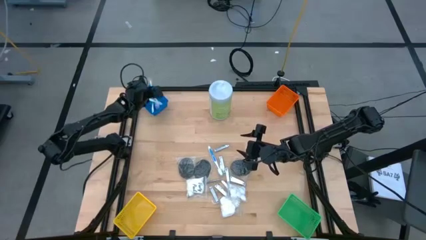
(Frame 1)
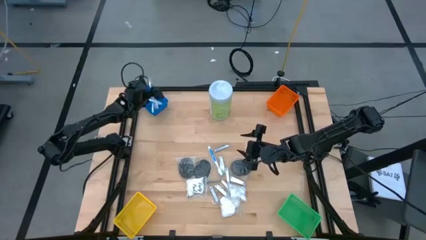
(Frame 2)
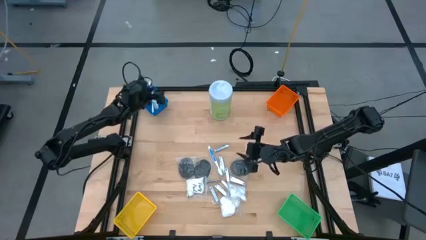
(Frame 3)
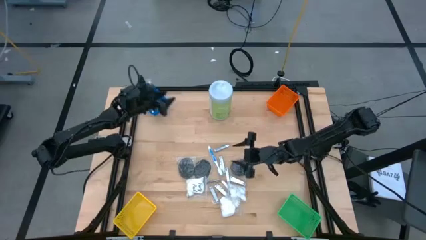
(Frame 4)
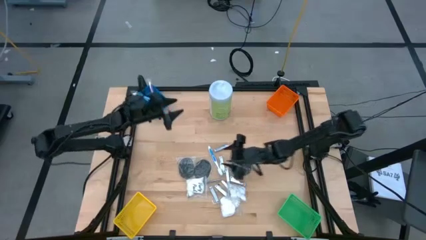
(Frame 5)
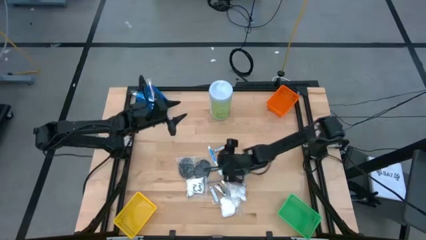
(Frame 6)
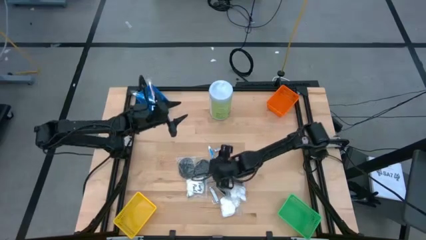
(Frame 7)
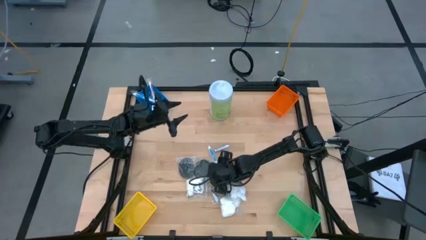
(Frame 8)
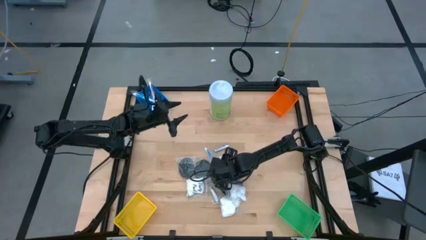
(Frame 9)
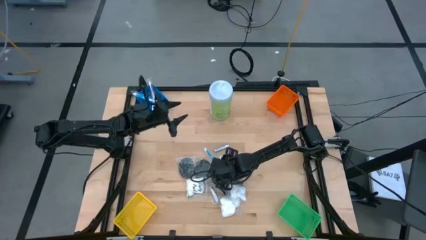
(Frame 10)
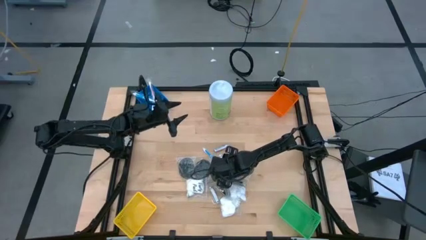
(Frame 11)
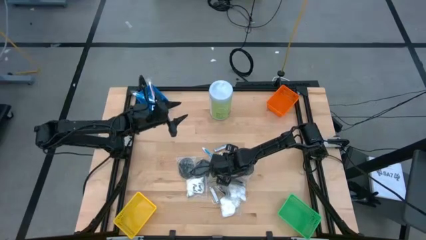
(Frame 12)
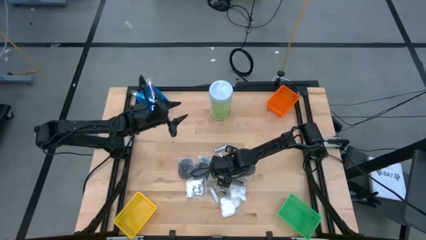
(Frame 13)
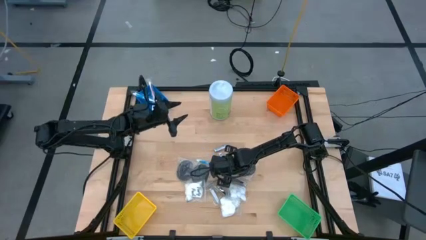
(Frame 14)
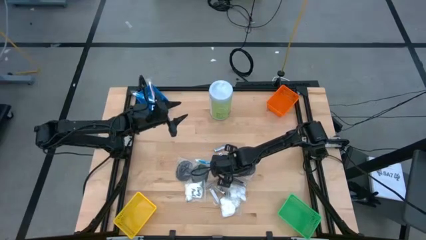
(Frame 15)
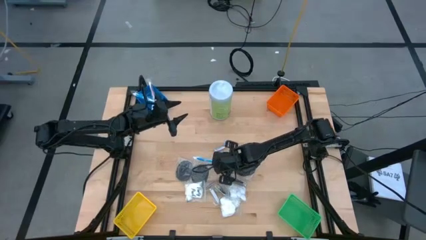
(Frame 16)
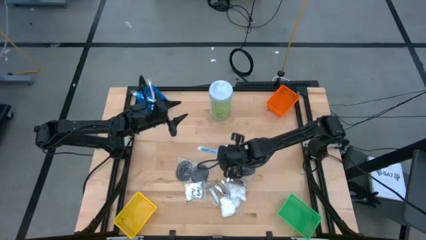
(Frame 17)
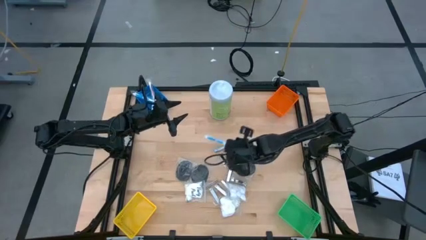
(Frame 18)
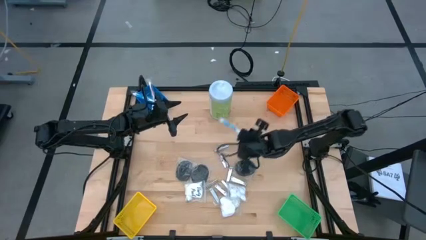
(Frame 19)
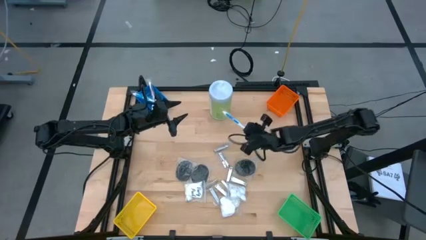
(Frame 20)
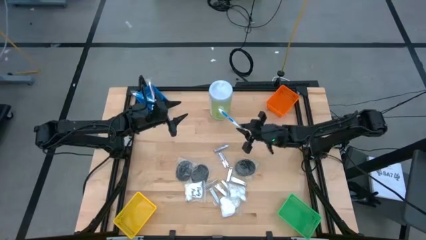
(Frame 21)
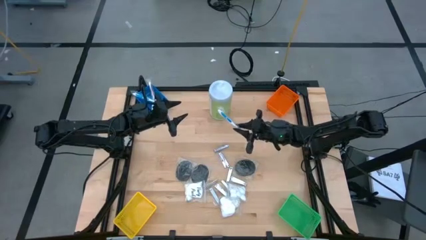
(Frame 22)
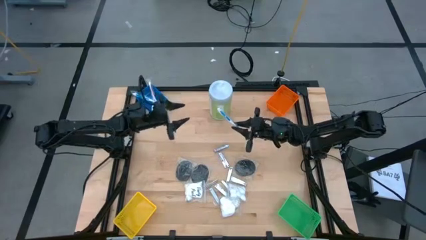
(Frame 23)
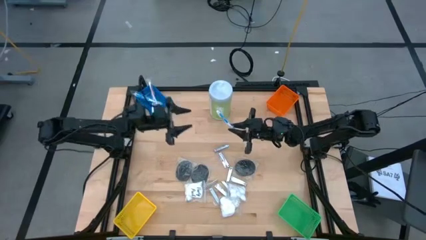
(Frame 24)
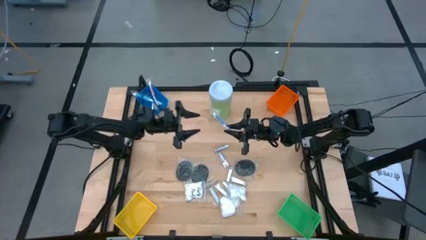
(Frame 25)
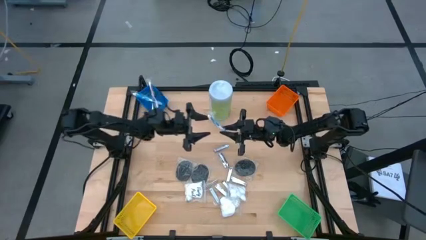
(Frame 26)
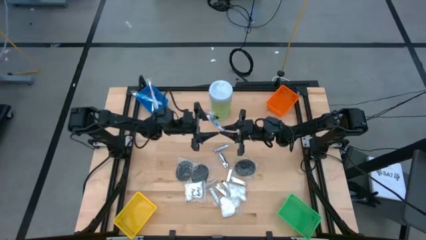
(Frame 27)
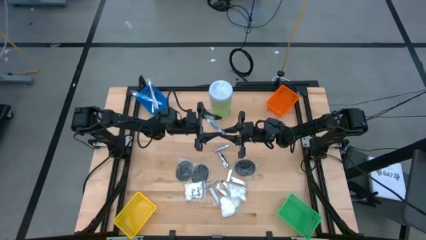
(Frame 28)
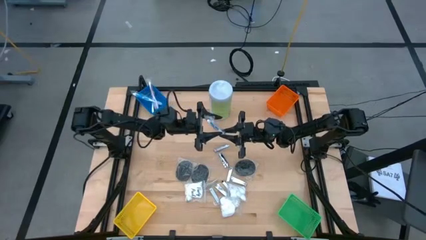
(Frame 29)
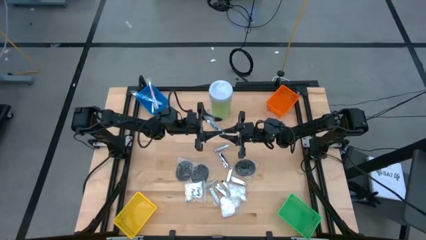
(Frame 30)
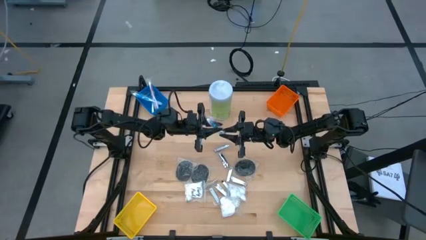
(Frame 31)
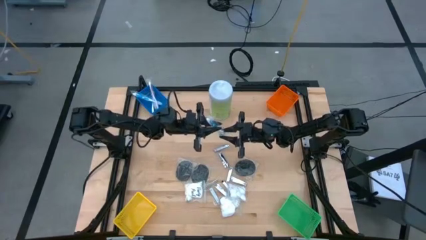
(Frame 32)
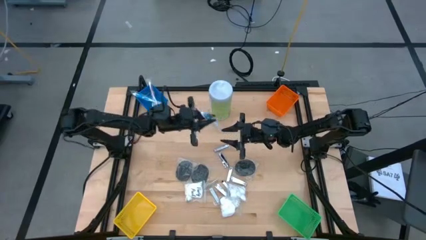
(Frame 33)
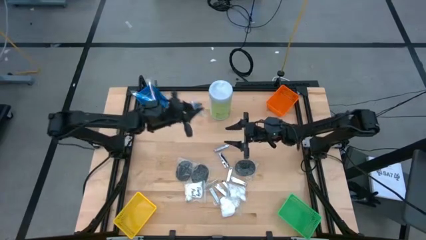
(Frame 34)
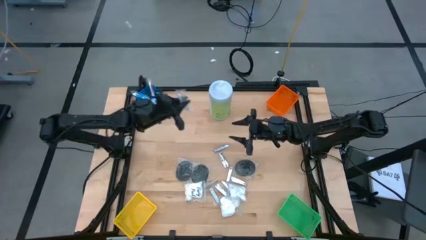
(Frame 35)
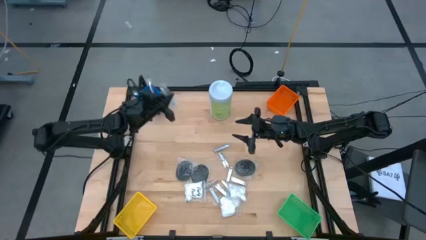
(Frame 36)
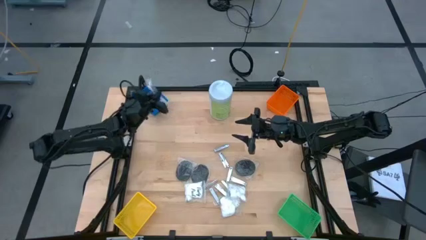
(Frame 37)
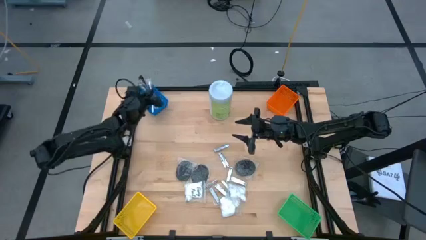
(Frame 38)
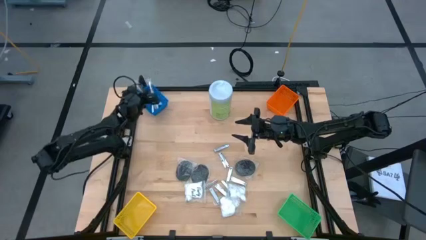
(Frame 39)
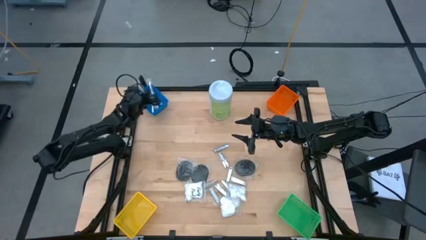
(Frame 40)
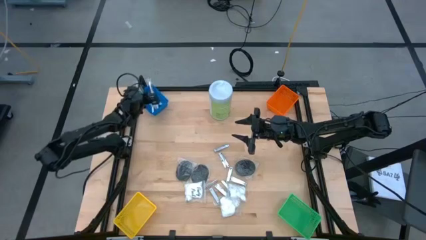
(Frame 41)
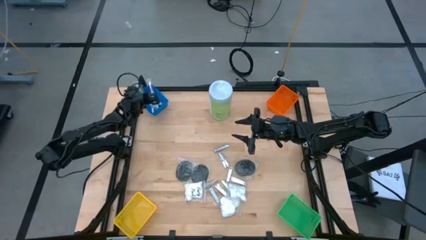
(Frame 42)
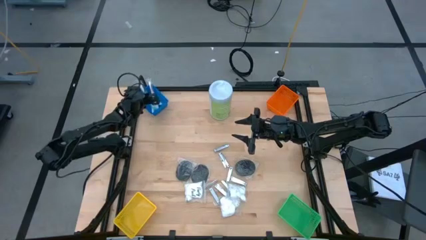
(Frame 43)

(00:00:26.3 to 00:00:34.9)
Task: Pick & Place Travel size toiletries
Put the blue toothbrush into the blue bin

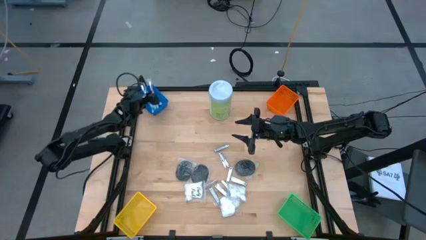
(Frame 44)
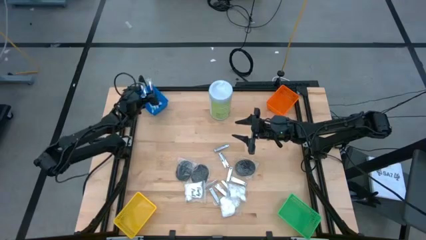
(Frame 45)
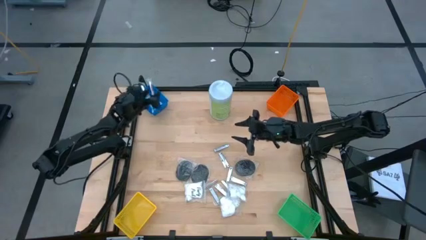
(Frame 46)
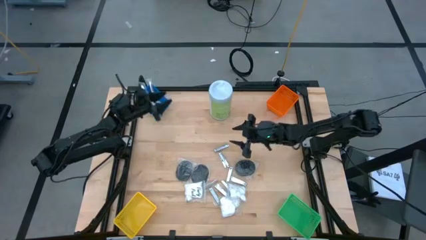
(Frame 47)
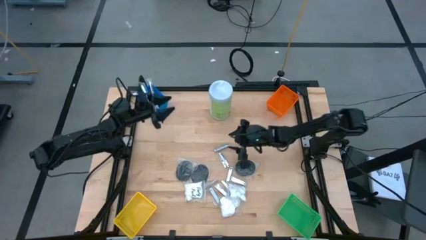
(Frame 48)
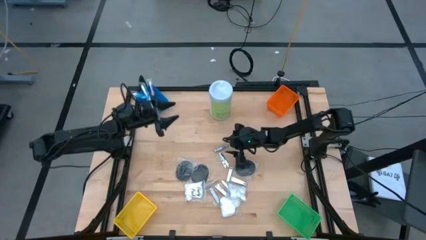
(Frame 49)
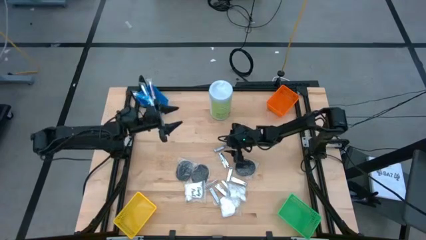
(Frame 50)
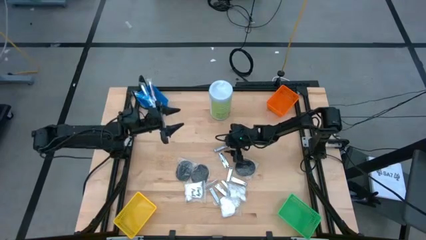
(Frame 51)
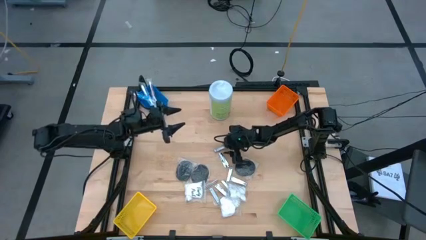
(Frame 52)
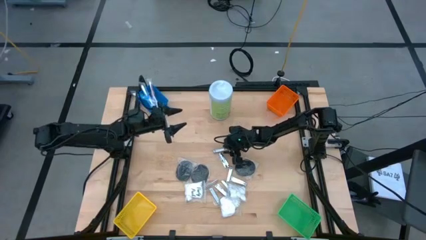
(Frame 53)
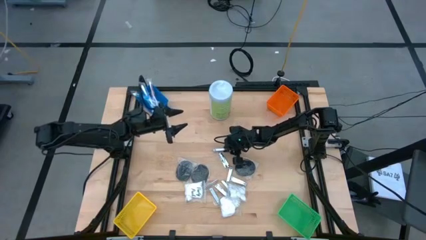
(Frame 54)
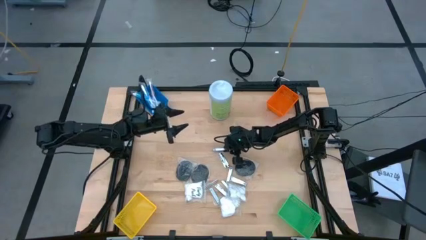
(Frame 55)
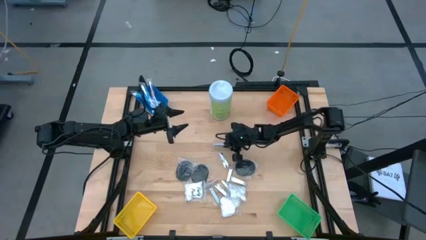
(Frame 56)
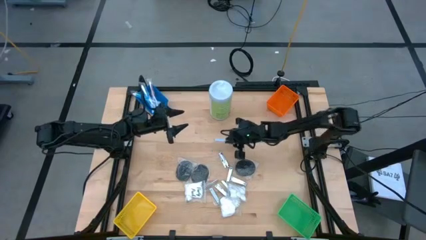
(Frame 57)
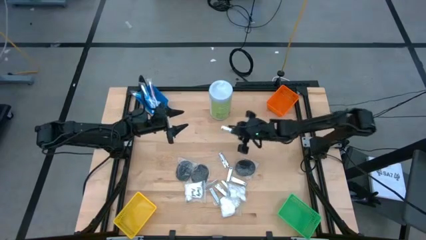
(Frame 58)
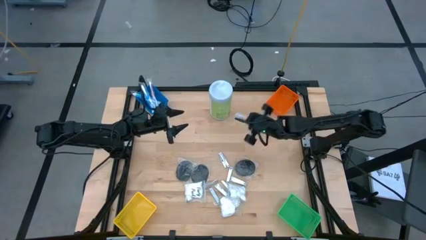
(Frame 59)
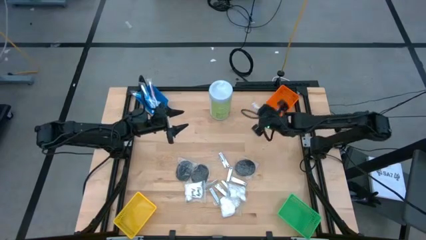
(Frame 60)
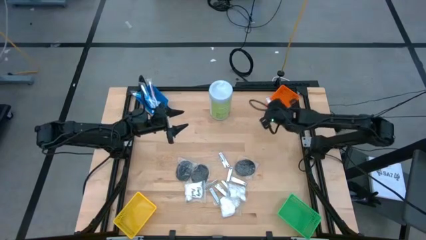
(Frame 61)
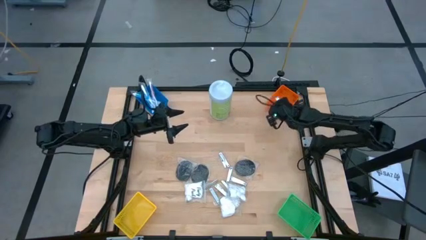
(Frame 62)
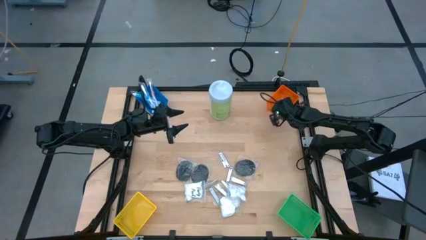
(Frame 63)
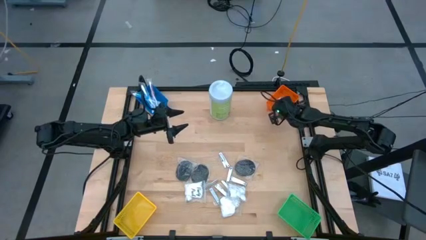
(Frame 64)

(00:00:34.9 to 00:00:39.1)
Put the nail cutter into the orange bin

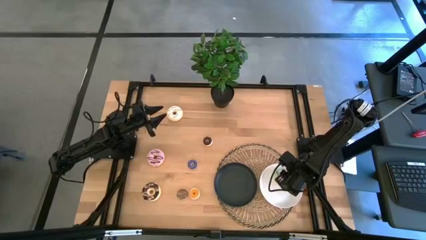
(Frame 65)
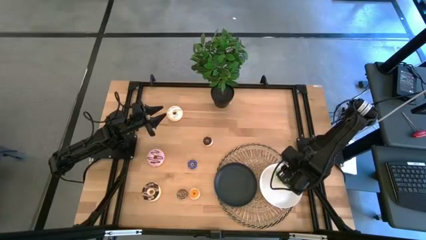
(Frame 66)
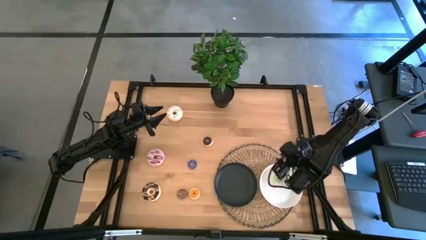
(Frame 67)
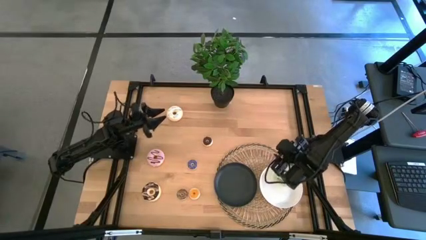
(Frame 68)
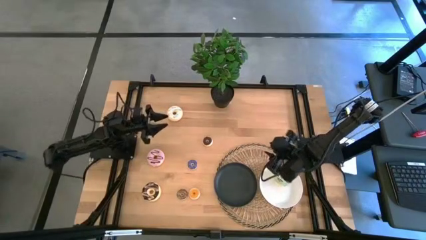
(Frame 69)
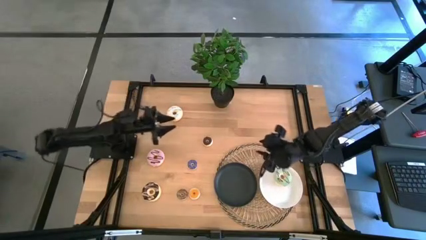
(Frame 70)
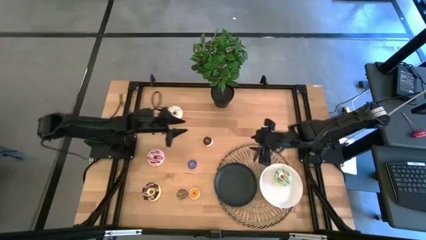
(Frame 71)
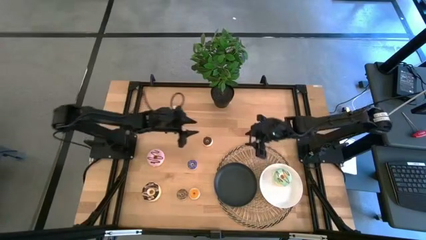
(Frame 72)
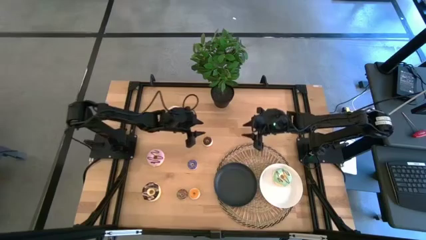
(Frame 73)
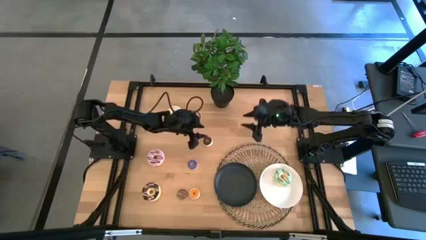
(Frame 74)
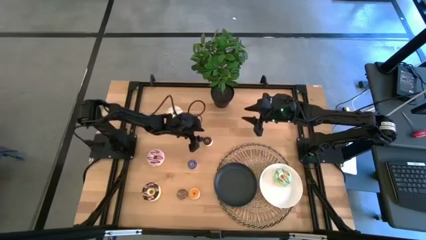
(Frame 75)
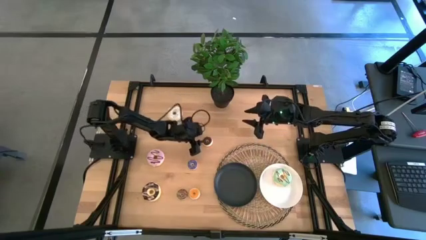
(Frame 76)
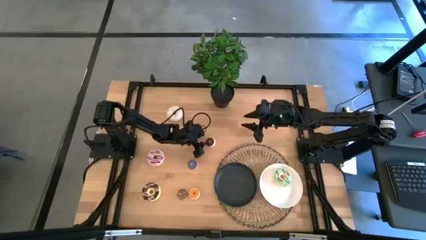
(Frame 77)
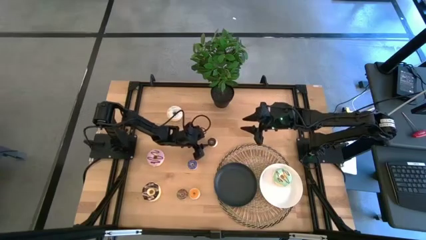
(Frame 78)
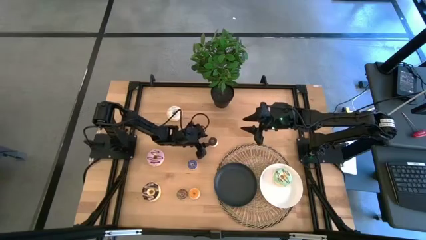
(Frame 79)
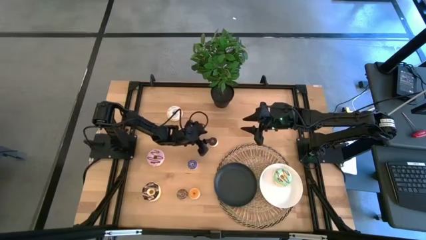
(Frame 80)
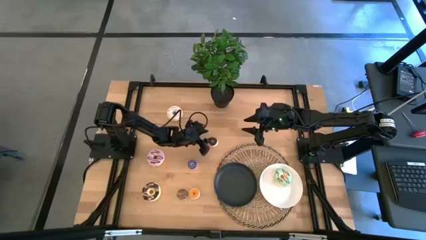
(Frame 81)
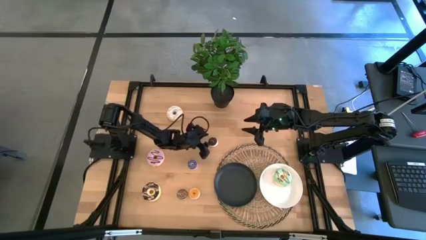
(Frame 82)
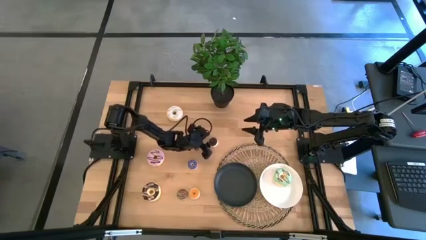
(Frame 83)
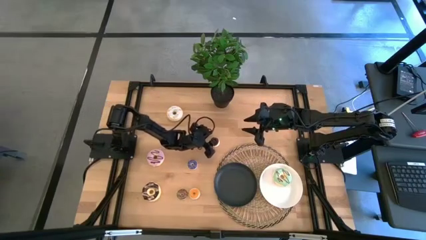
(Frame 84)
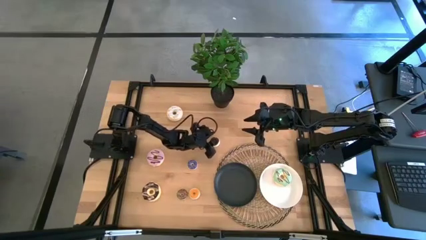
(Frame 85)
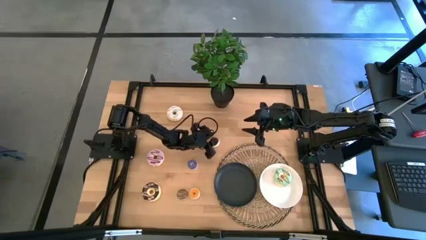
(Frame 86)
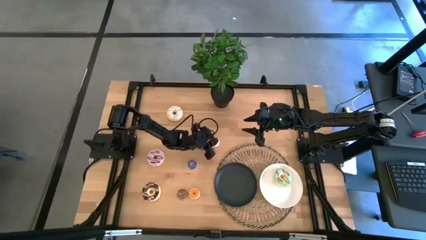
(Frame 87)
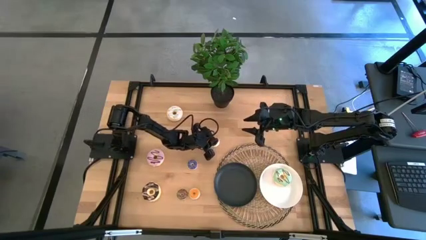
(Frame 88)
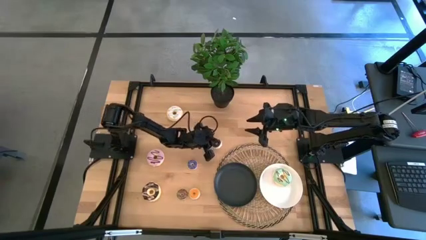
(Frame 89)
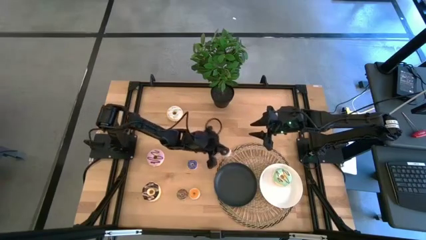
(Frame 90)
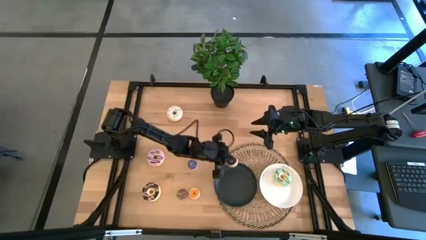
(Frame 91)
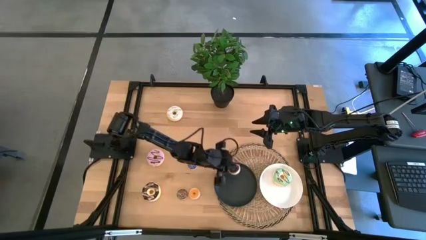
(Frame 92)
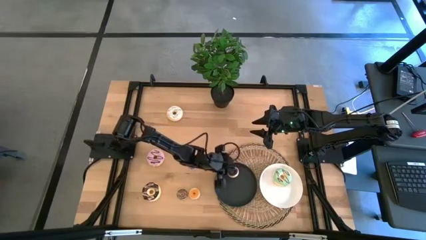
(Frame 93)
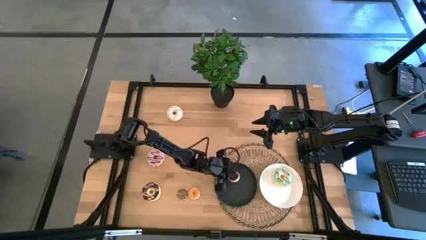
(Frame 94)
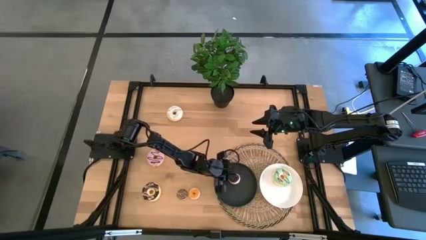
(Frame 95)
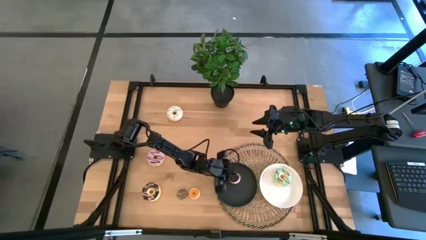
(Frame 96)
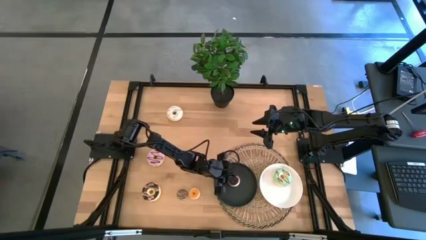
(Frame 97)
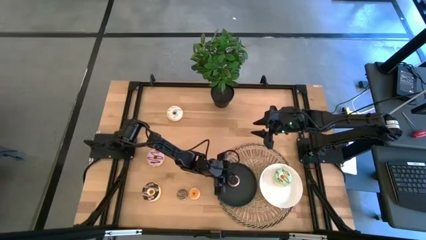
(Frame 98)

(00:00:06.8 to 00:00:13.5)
Task: Pick & Place donuts
Put the small black donut on the black plate
